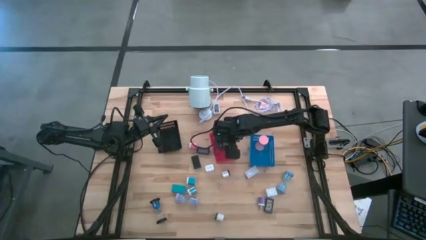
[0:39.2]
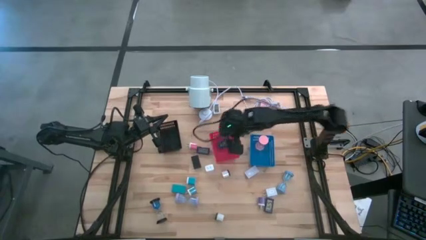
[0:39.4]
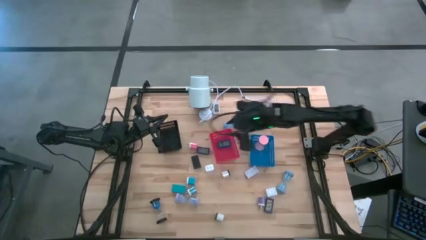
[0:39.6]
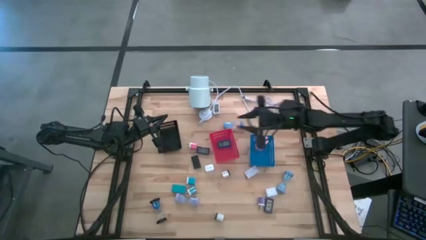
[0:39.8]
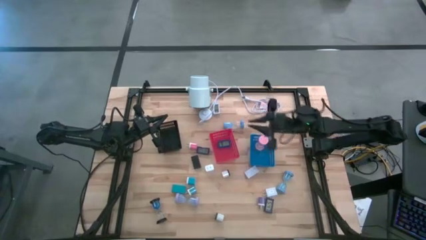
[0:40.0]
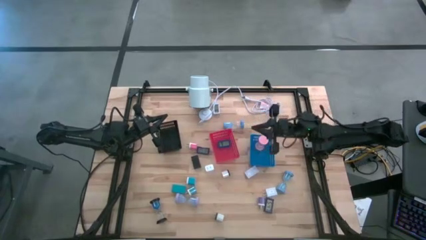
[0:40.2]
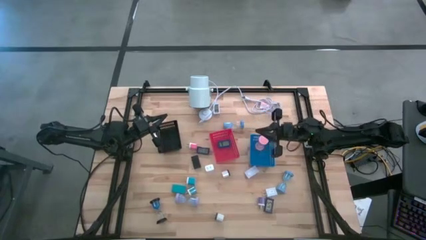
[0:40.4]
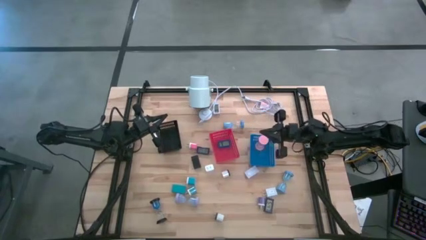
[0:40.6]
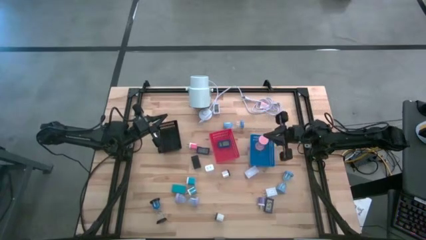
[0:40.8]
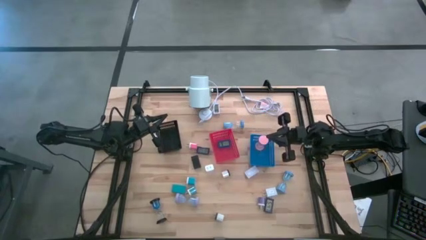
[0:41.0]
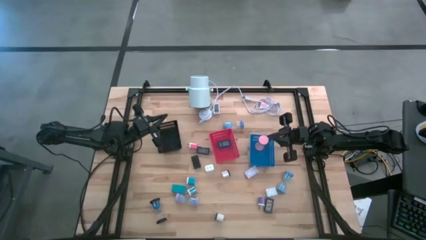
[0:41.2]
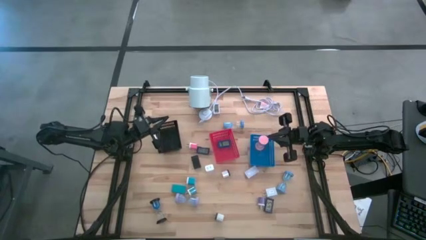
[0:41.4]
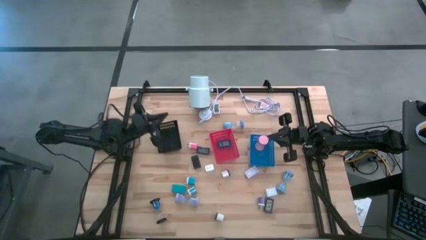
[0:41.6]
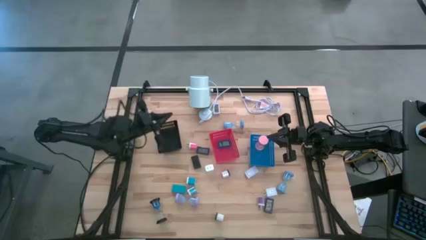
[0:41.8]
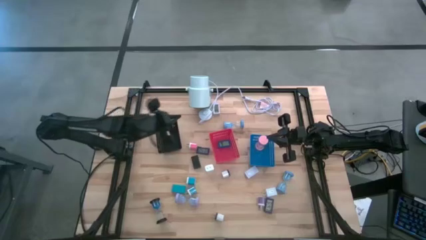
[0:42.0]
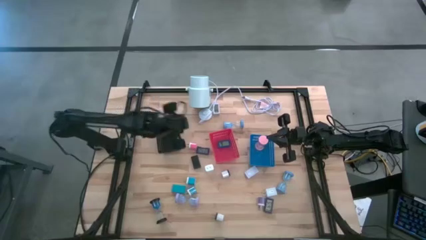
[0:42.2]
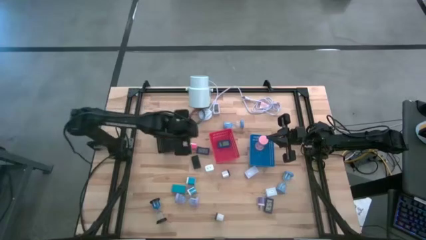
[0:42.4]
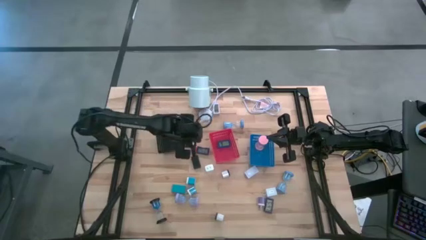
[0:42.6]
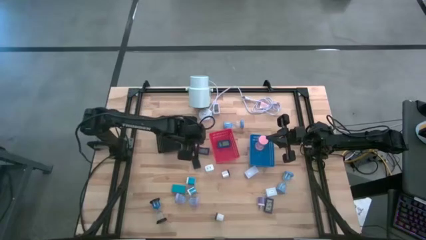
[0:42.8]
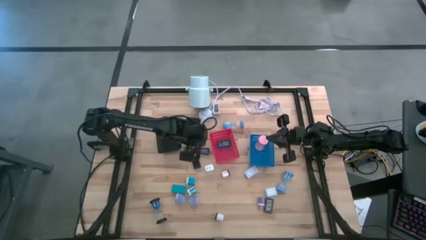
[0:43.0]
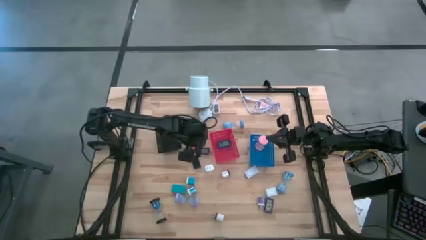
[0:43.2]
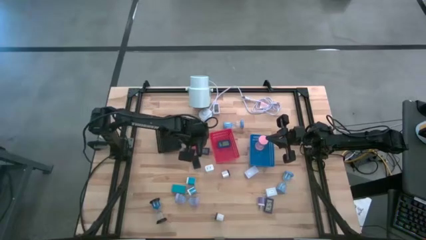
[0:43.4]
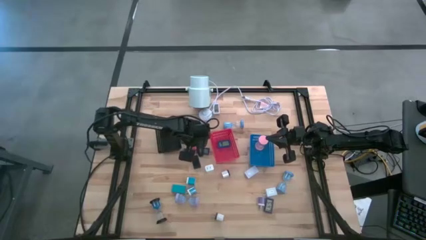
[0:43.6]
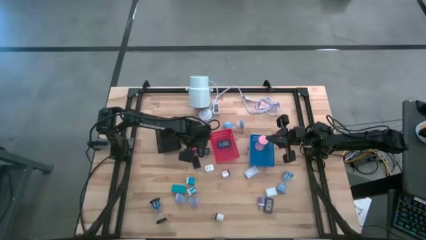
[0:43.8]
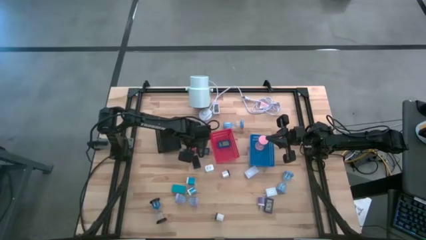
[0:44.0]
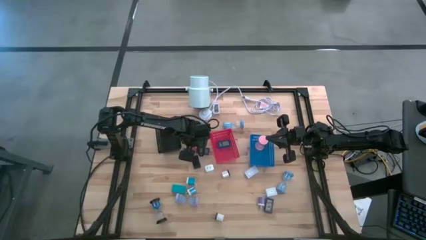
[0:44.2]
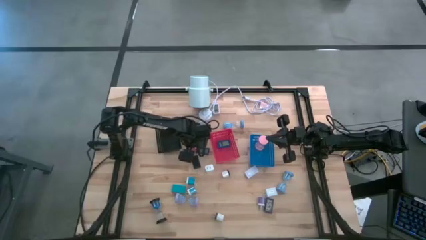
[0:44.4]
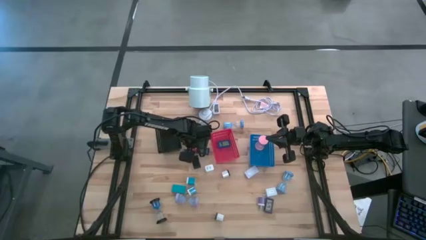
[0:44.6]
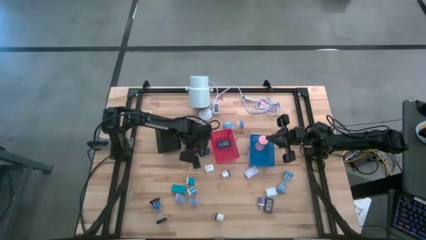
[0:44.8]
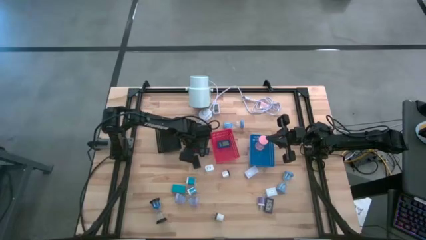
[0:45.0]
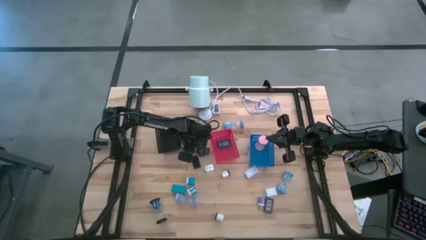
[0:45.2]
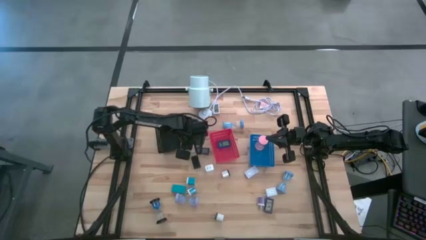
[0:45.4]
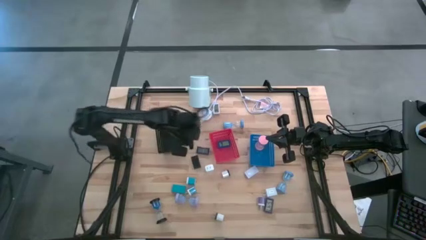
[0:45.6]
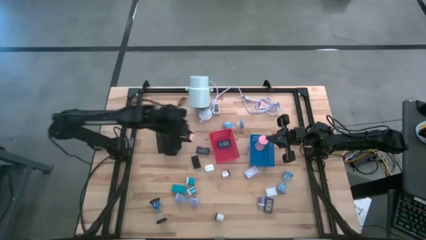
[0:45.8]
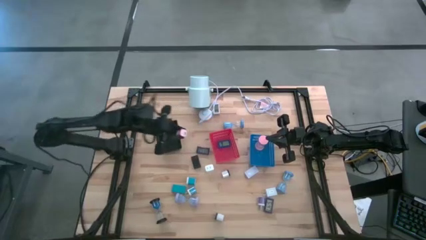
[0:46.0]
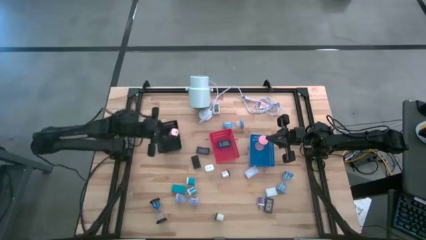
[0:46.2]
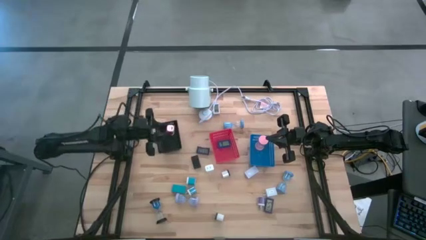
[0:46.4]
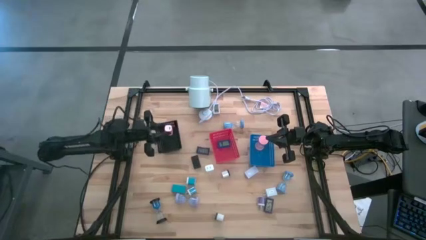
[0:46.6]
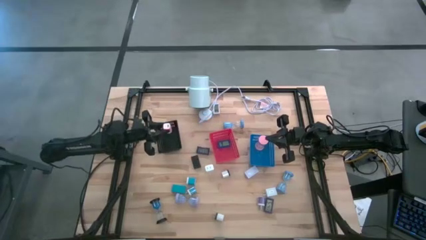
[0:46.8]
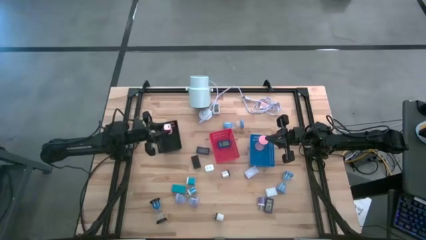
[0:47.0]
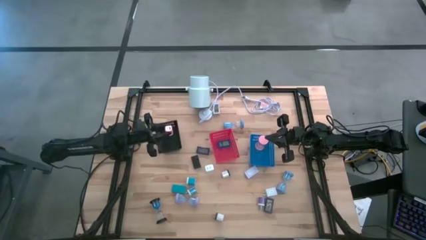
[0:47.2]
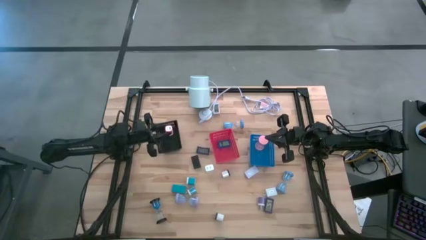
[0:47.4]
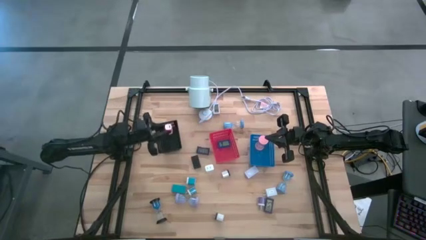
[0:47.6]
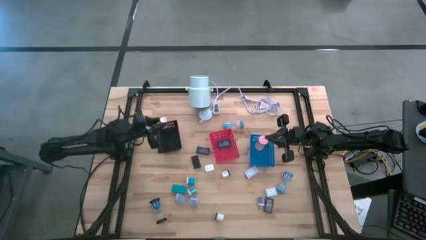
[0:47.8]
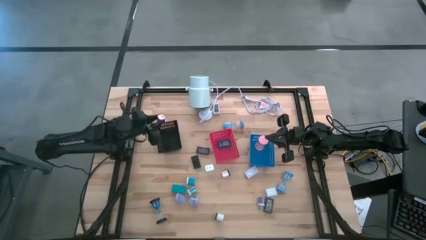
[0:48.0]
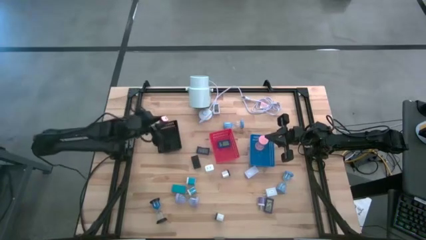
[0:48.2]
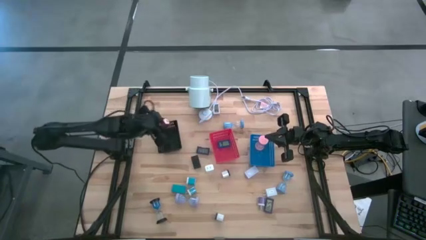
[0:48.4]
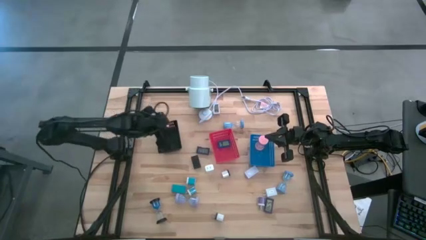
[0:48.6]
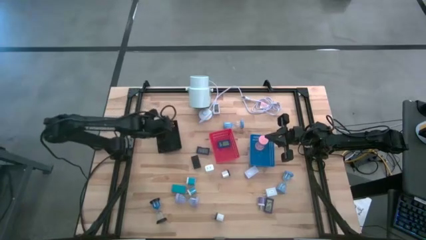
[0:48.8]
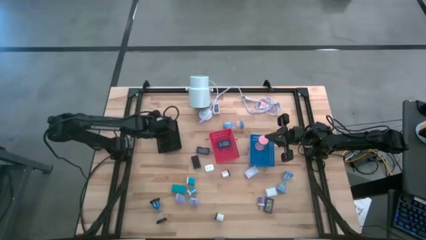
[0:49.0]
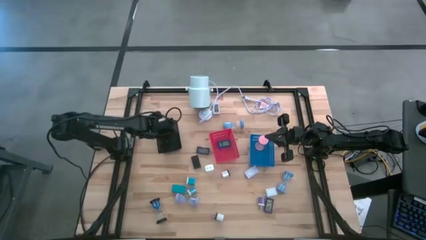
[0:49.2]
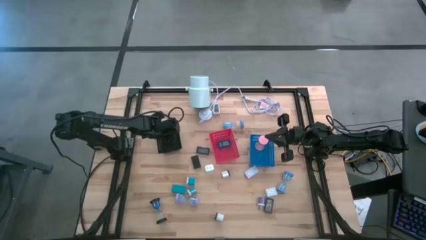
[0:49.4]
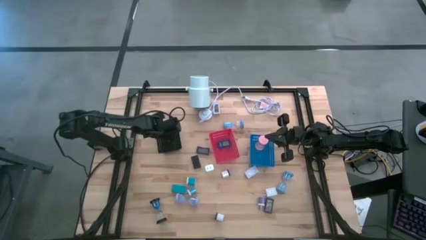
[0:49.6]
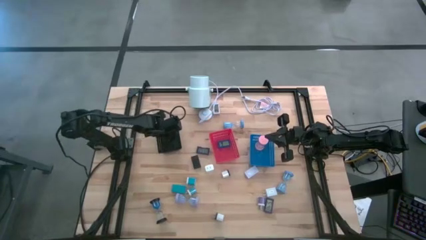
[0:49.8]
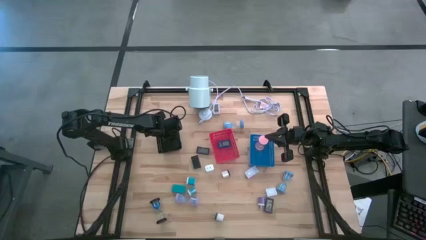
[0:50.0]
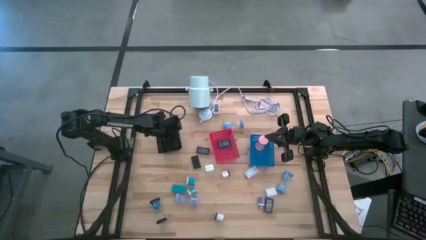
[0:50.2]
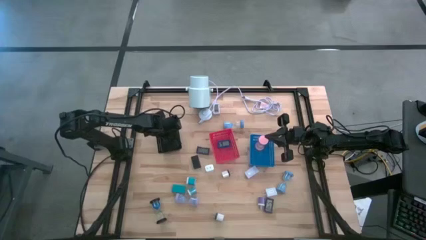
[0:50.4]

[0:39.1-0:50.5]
Task: Pick & Place Office items
Put the pink charger adapter into the black bin

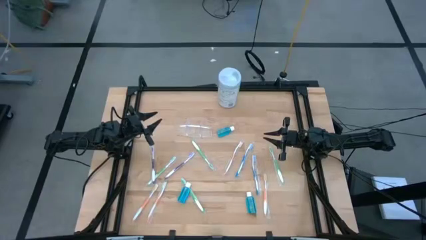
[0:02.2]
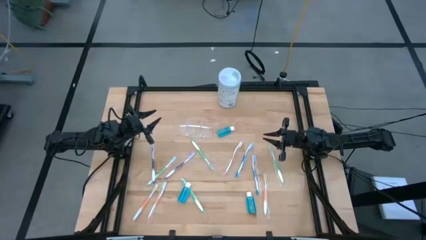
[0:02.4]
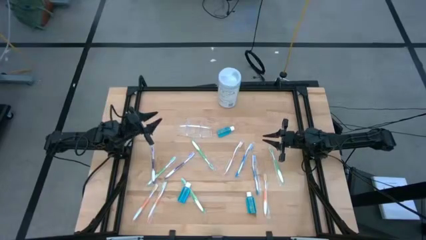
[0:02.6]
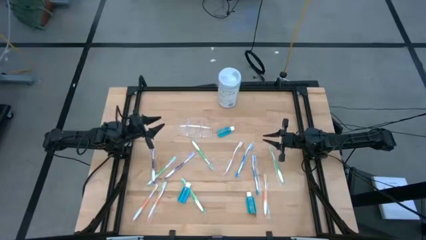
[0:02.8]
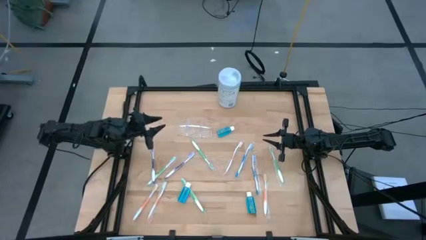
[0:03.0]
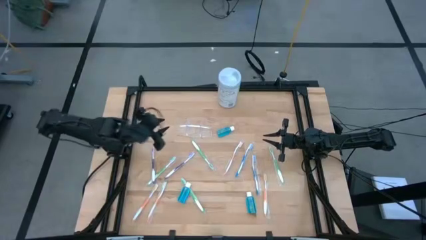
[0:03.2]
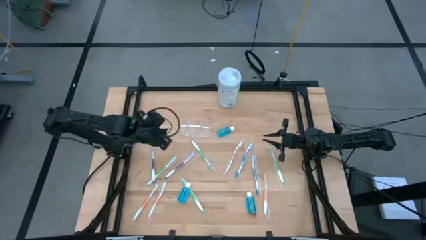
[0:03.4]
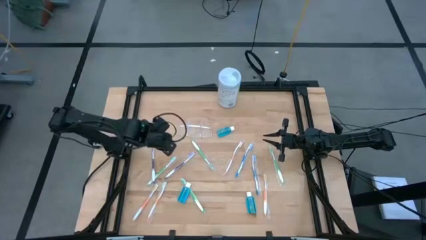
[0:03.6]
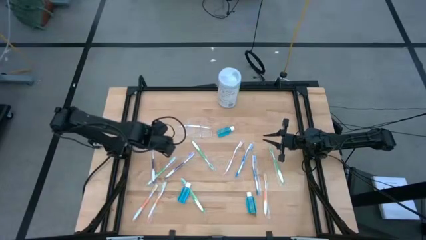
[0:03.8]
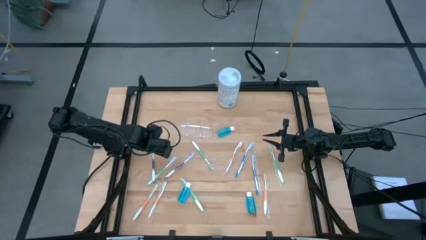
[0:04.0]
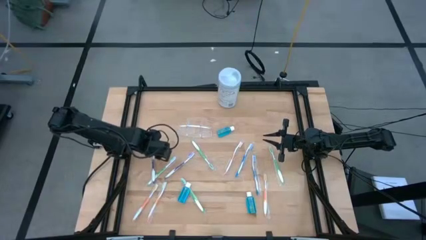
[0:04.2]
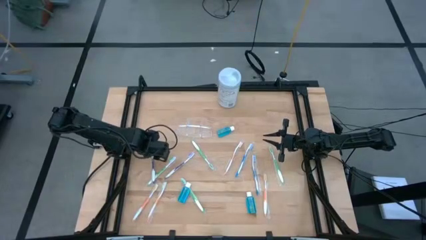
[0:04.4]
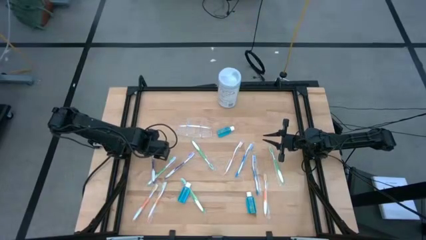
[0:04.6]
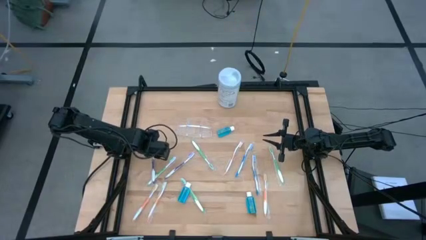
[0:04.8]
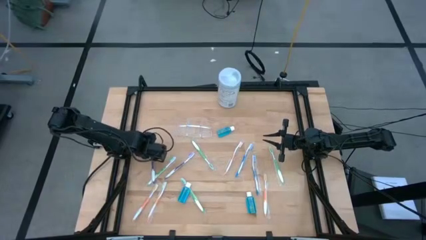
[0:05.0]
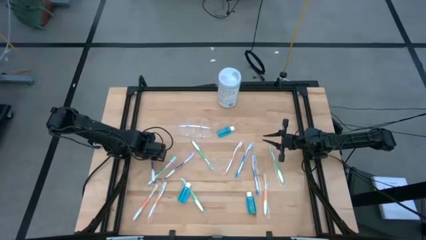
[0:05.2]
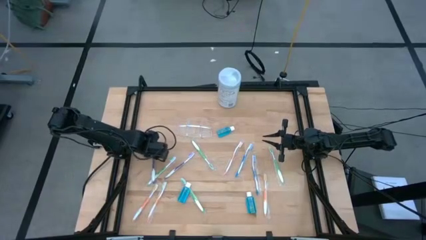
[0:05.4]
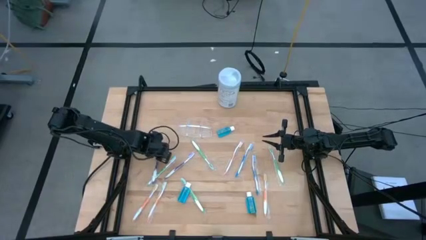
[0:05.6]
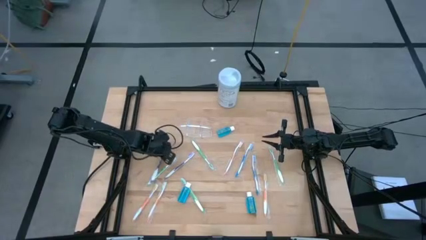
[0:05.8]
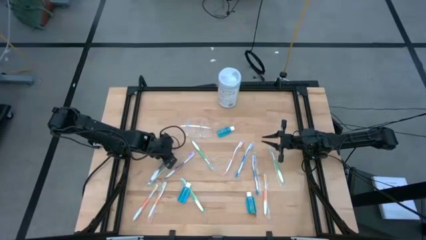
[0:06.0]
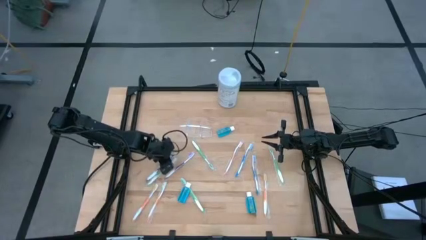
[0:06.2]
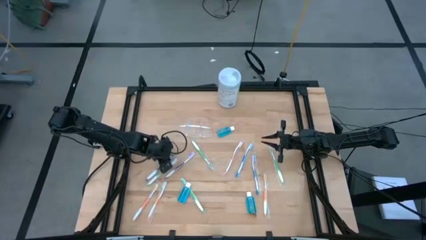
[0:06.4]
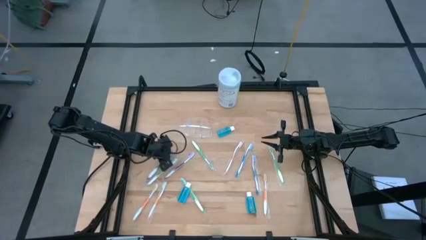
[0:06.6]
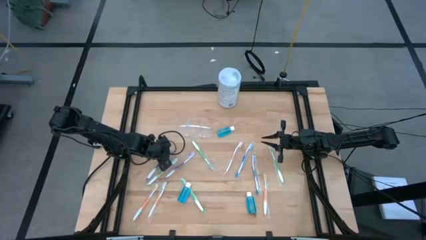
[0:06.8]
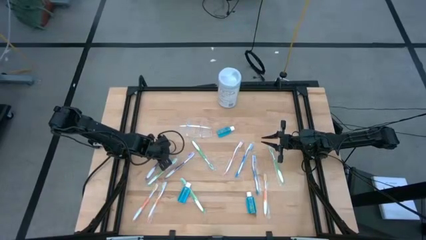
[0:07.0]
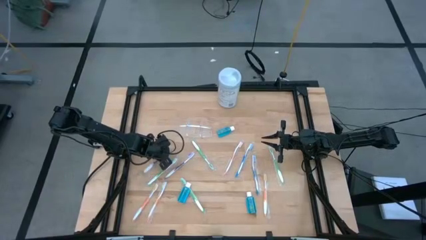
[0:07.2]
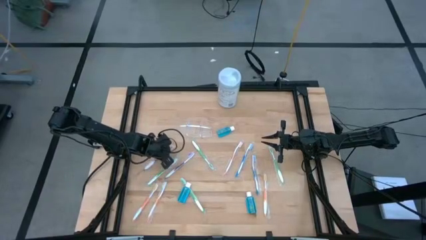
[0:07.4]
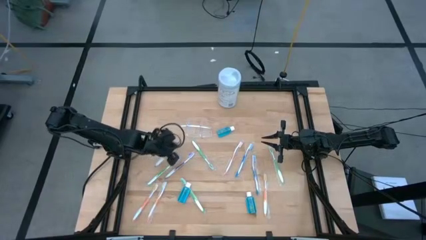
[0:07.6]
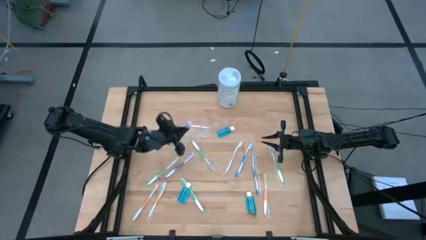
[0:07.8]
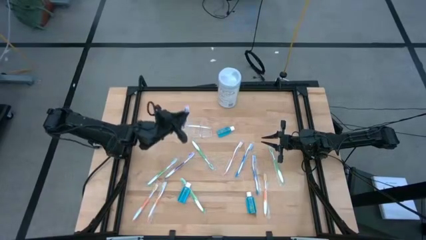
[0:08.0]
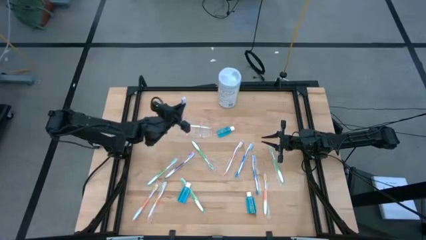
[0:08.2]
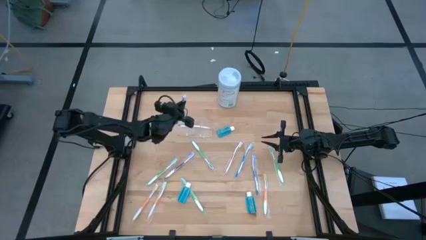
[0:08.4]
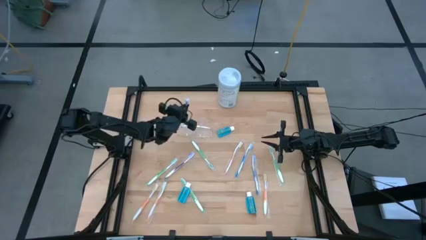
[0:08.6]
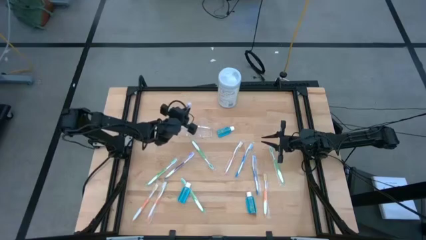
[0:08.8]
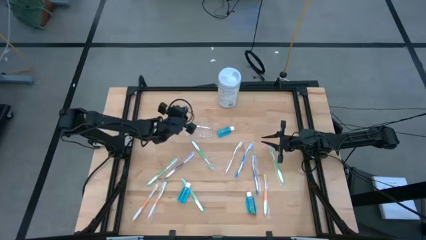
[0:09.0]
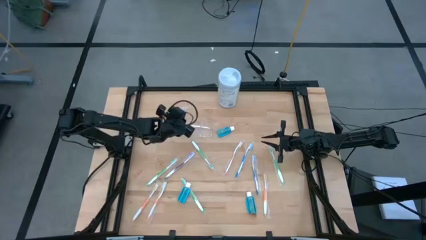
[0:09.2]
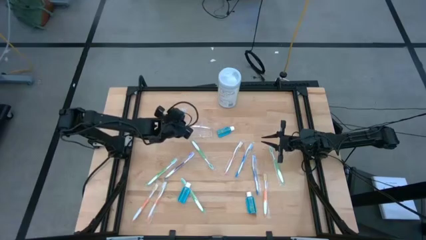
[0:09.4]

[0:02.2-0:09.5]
Task: Pick & Place toothbrushing station
Put the violet toothbrush into the transparent organizer
